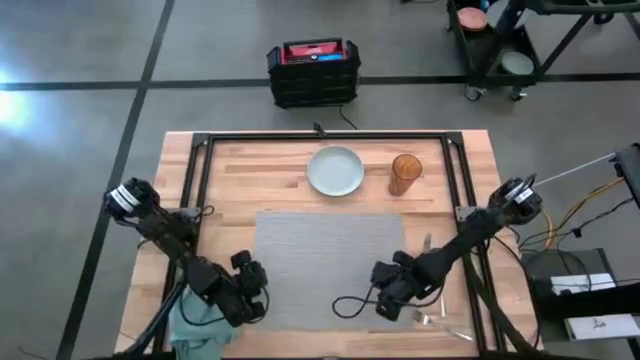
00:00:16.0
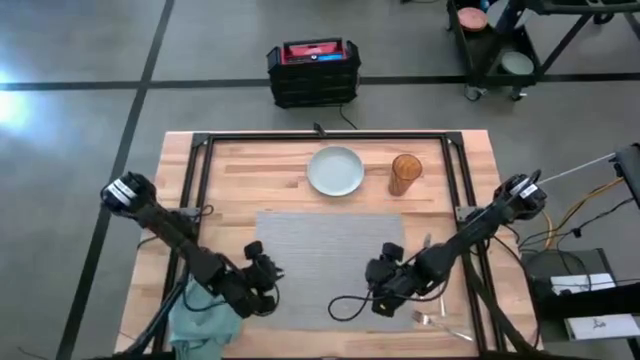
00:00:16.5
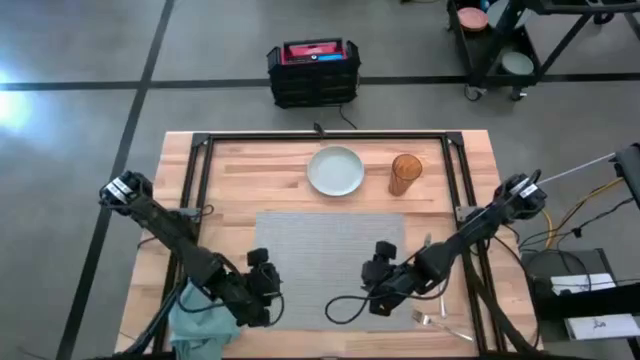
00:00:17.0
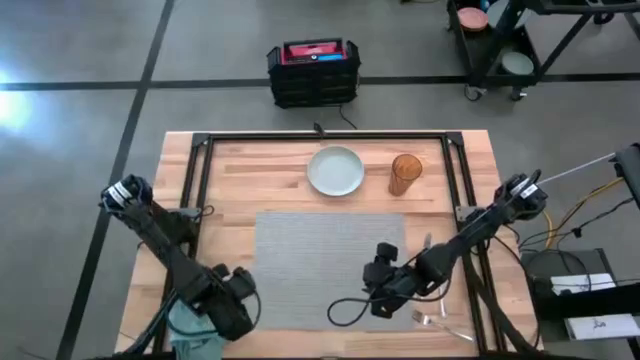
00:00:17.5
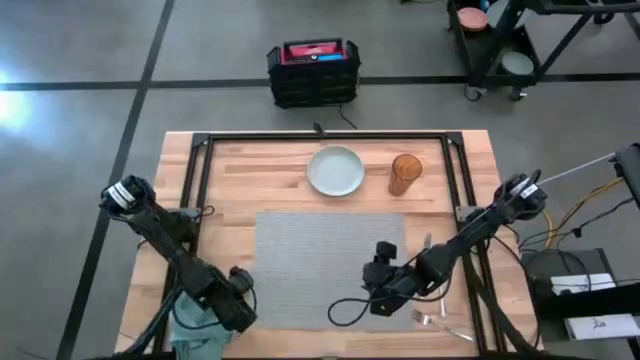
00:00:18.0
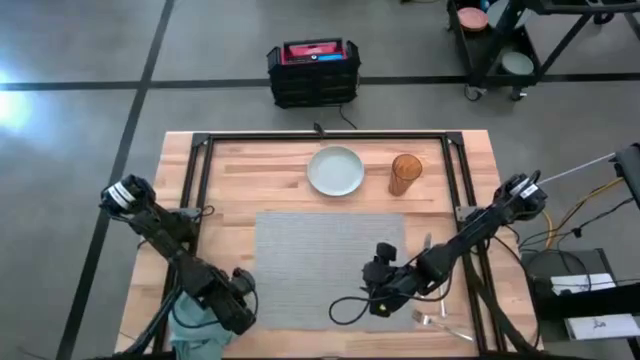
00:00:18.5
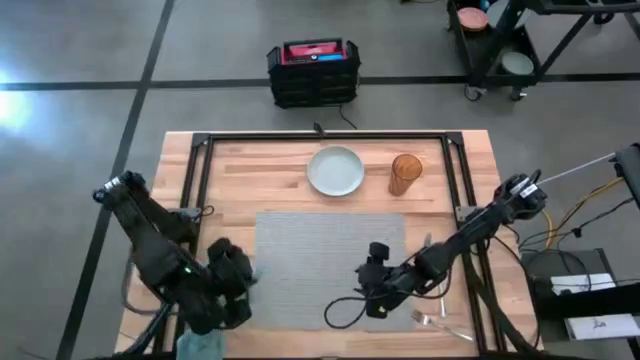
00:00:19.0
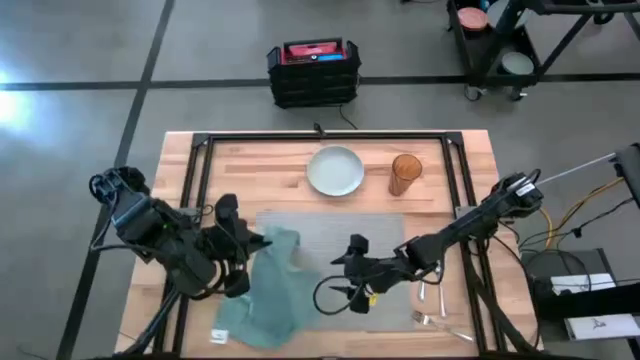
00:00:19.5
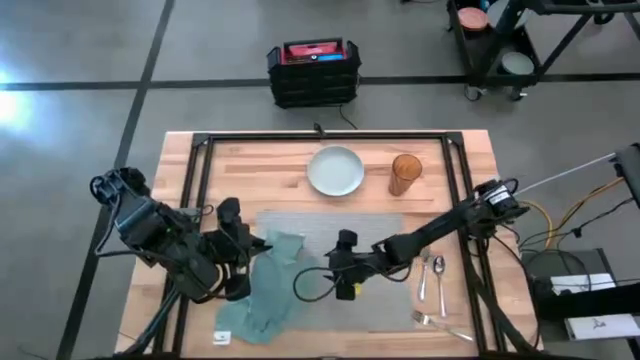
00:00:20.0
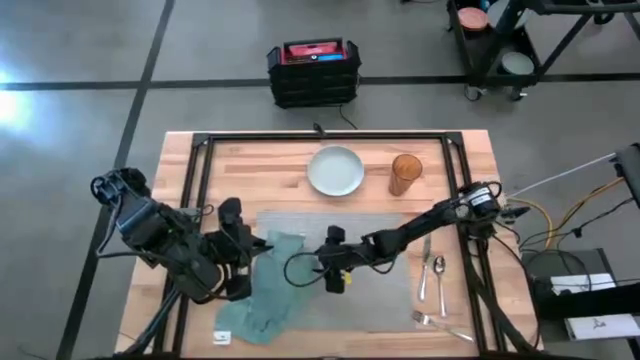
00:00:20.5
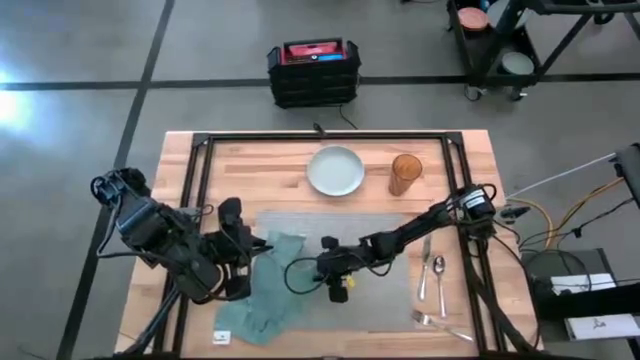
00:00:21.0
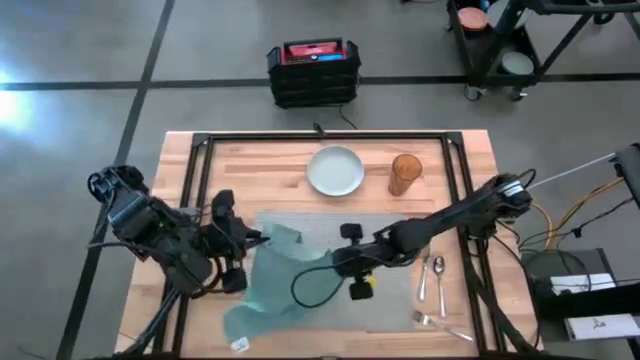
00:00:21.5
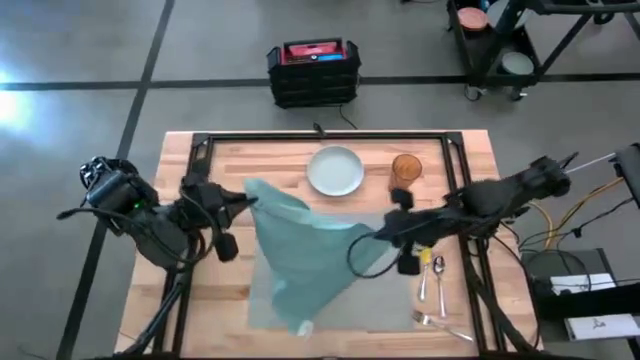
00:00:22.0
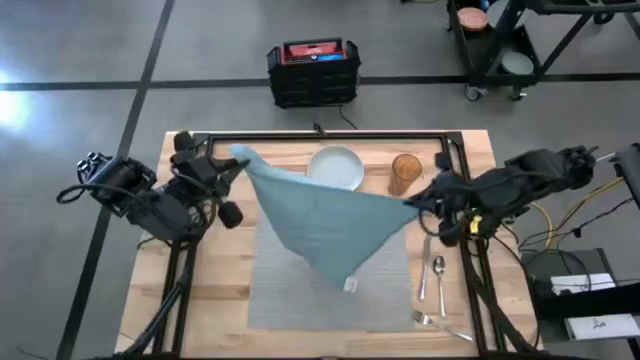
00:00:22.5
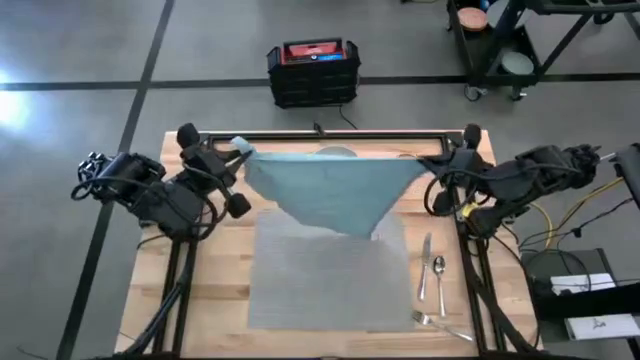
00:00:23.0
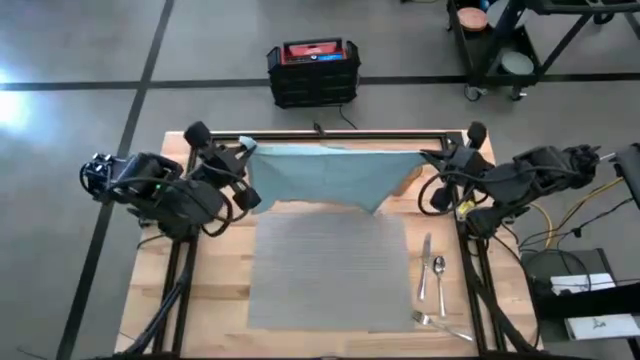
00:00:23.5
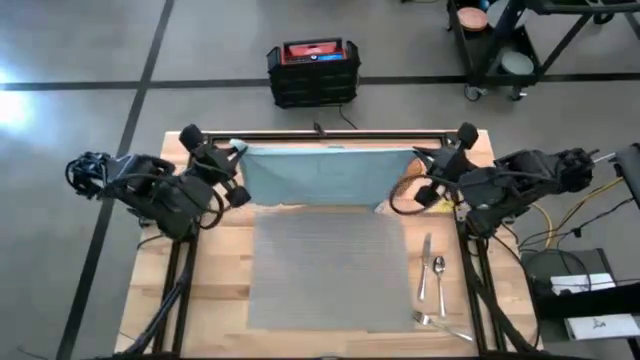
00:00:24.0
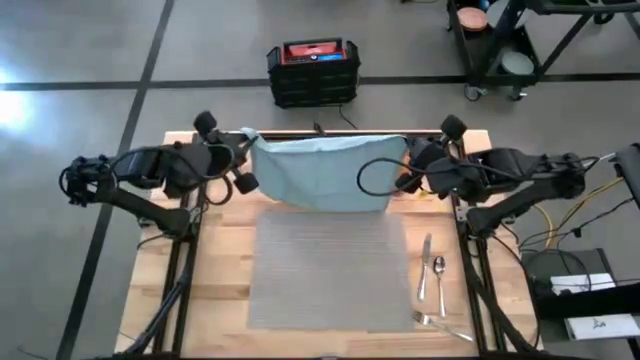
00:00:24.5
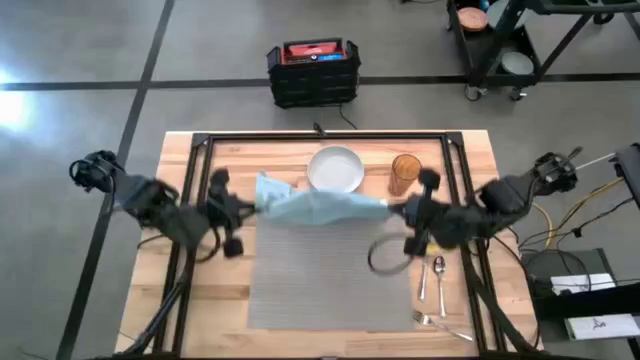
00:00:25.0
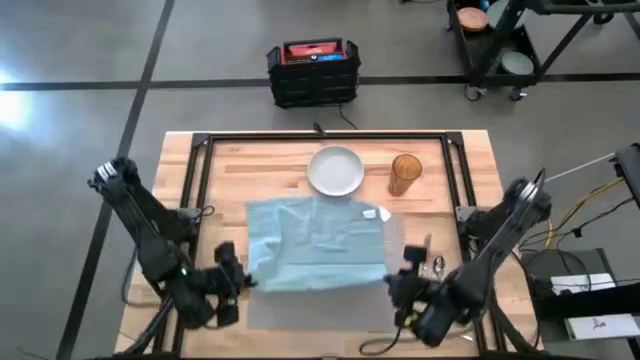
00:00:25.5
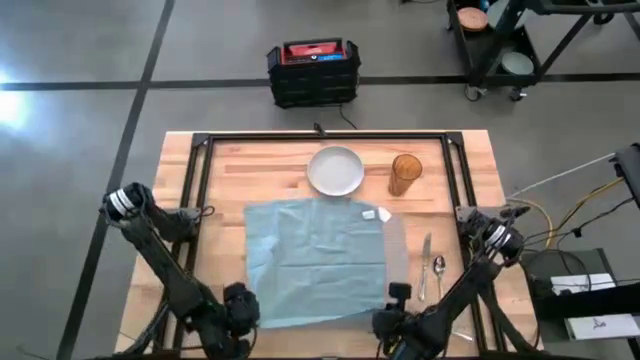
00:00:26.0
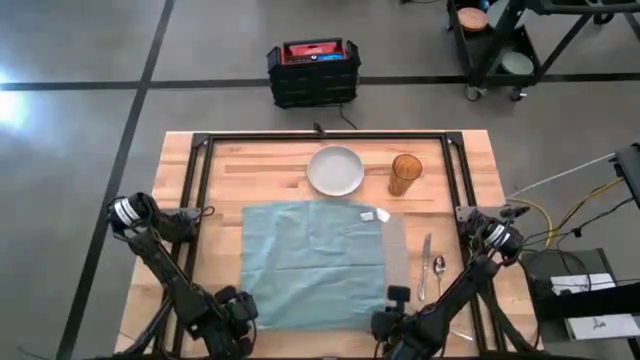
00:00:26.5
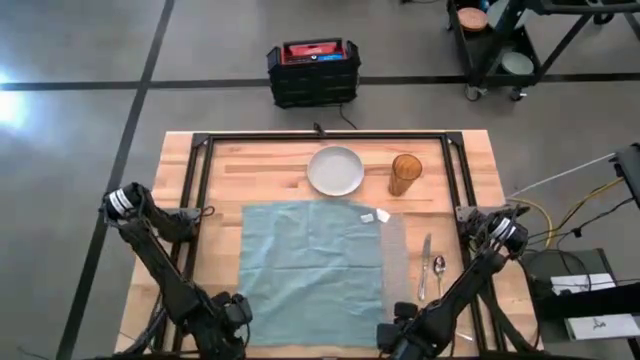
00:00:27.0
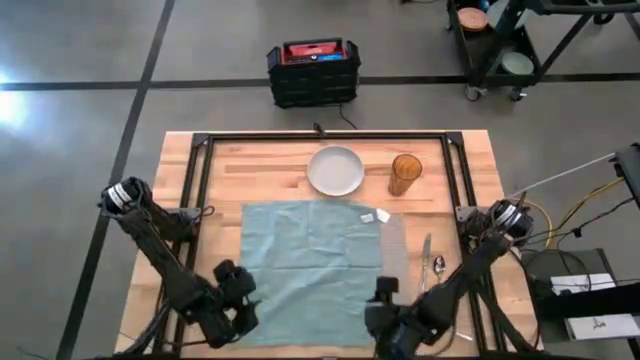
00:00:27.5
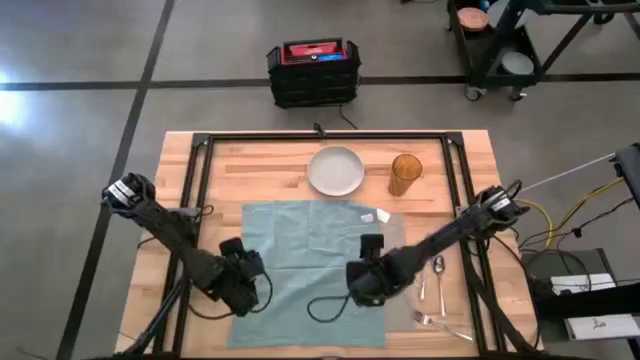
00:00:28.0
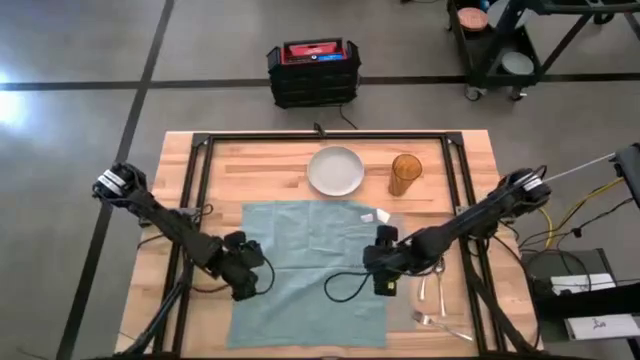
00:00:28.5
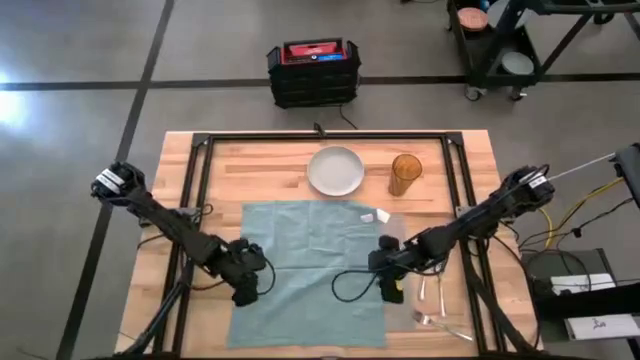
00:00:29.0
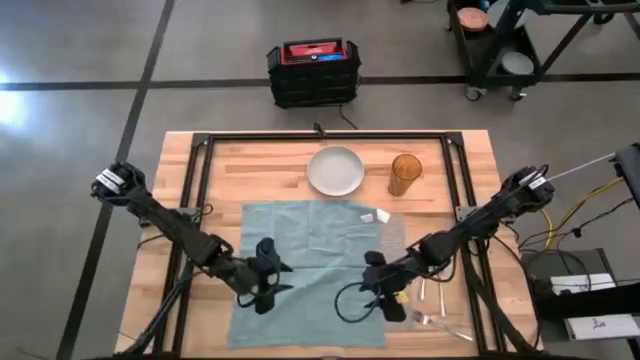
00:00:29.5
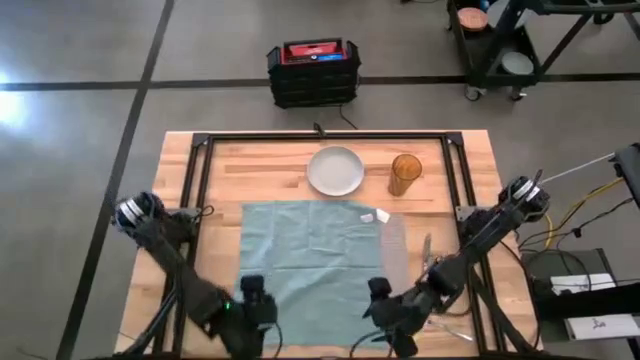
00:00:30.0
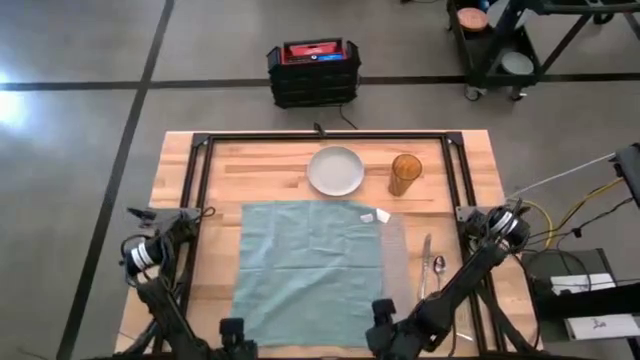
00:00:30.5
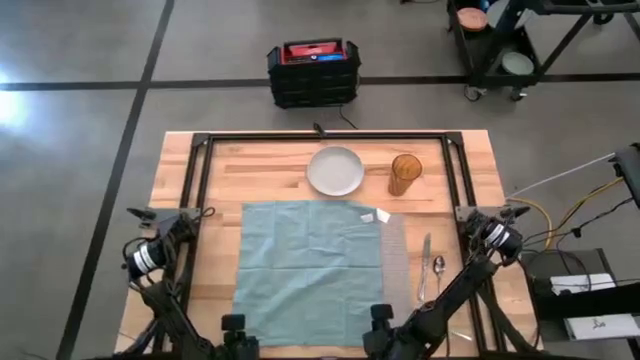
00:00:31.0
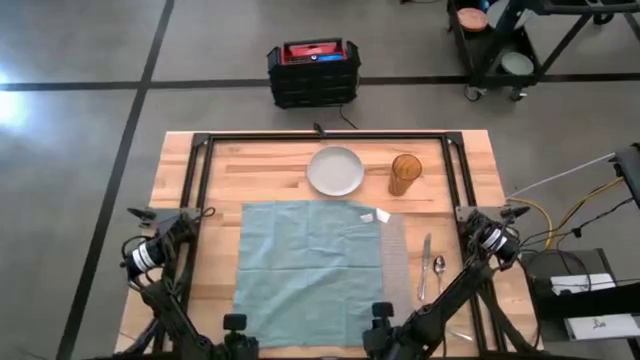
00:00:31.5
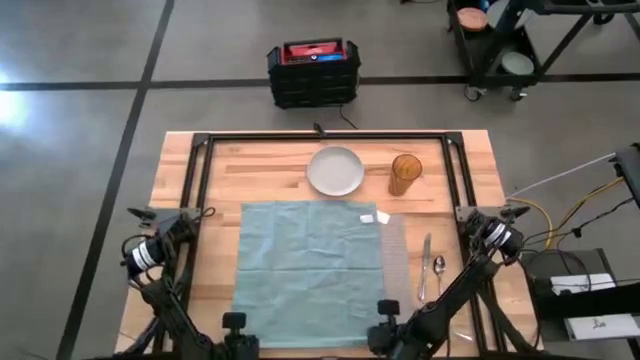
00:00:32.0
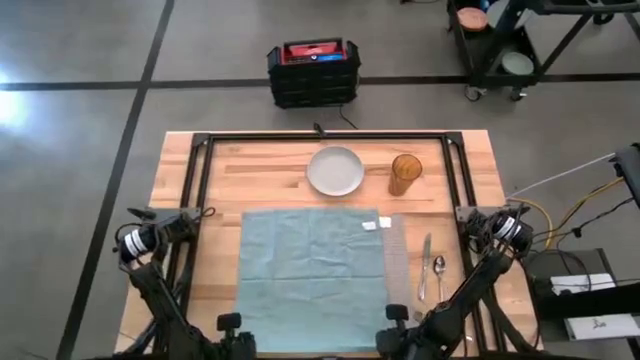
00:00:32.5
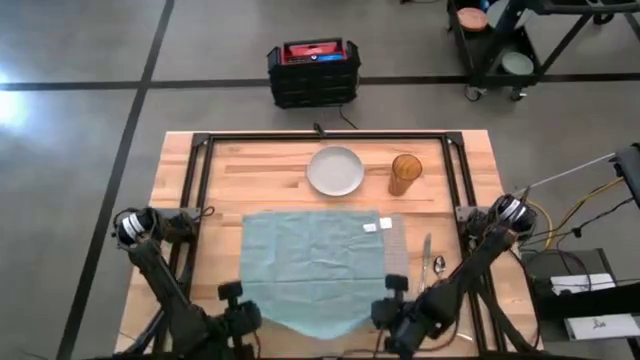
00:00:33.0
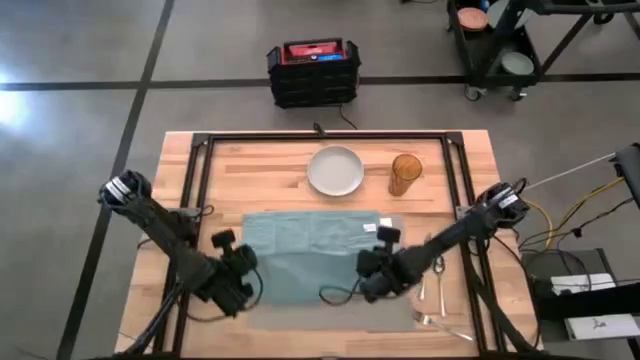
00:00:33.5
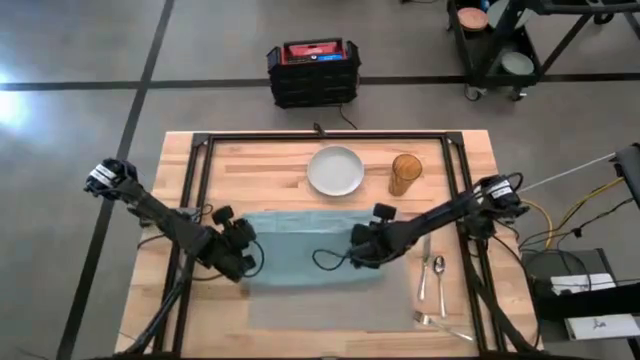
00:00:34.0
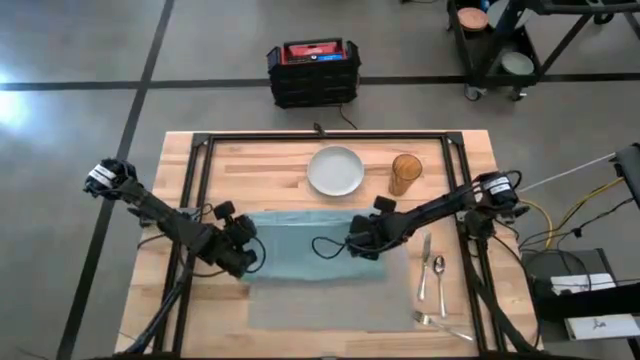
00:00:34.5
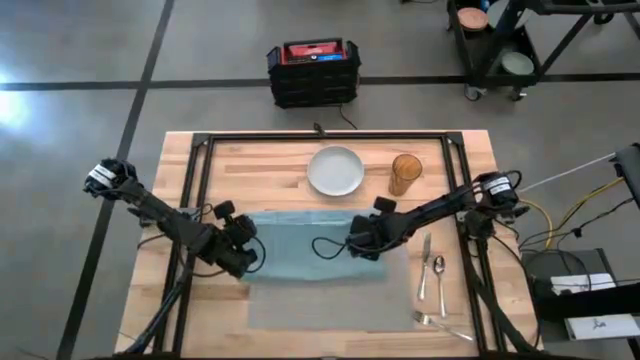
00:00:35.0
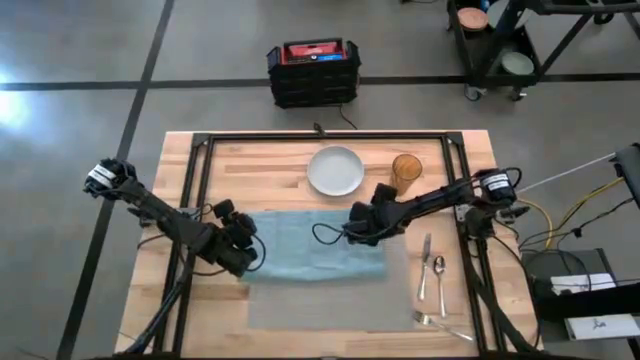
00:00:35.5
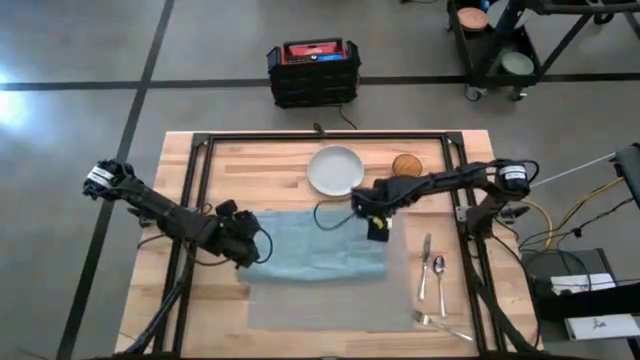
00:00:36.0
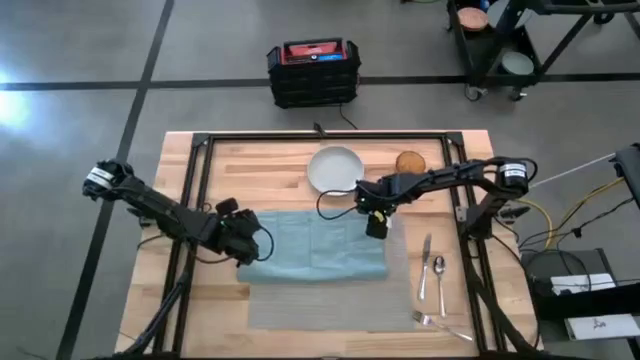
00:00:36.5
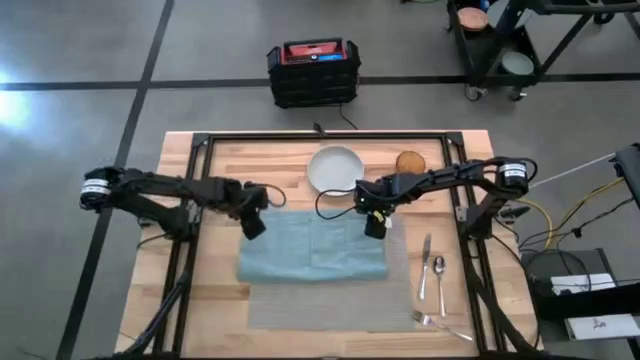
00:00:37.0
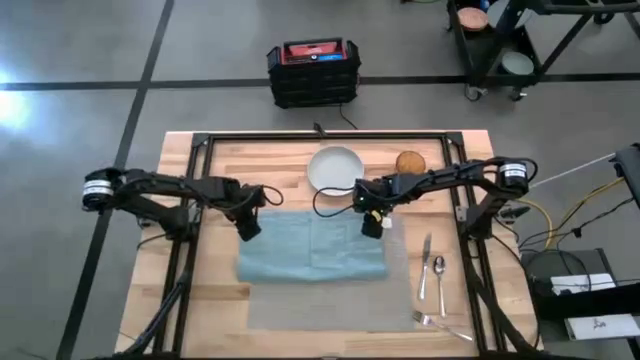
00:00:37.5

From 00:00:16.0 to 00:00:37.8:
Task: Set table place
Fold the table napkin
